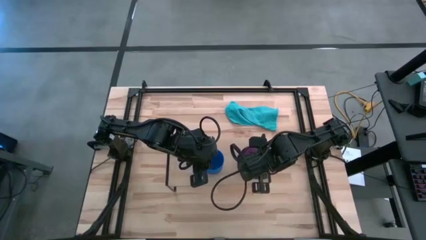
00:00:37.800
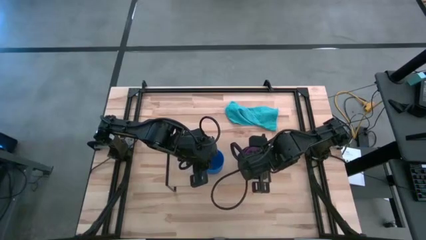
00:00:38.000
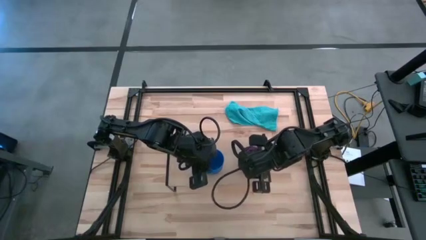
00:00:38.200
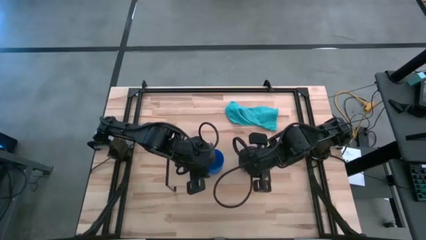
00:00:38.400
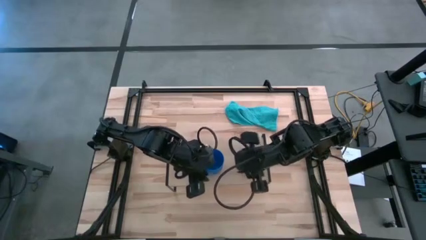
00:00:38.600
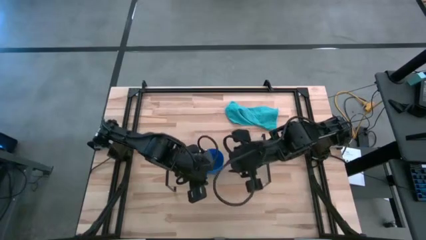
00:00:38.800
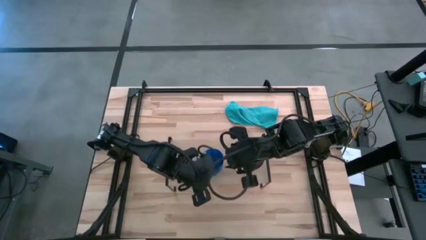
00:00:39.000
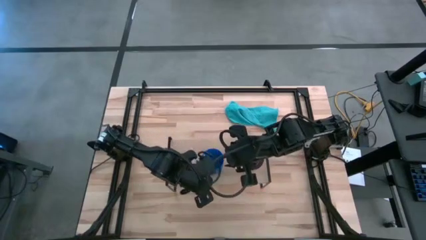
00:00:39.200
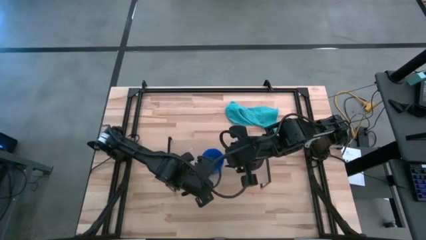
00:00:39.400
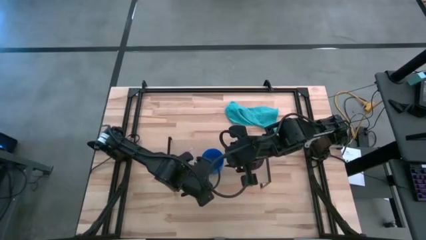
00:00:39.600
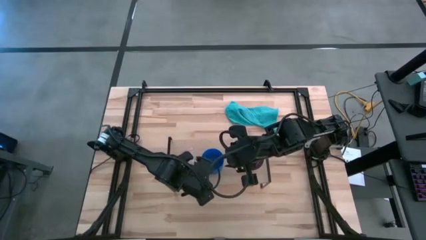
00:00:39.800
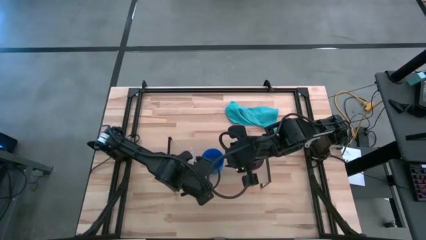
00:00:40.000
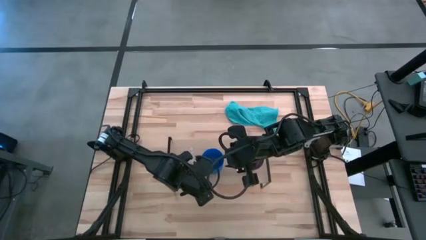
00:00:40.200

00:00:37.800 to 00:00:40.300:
Task: Stack small to large cups/mugs on shelf
Adjust the blue mug

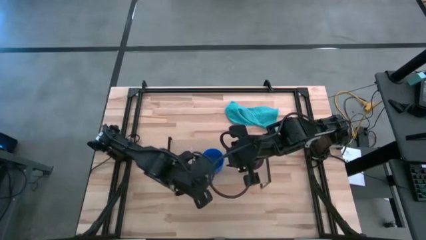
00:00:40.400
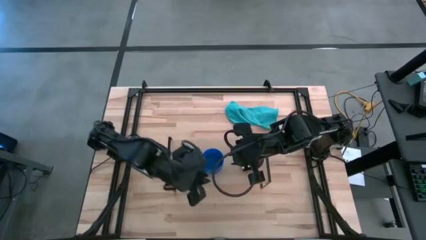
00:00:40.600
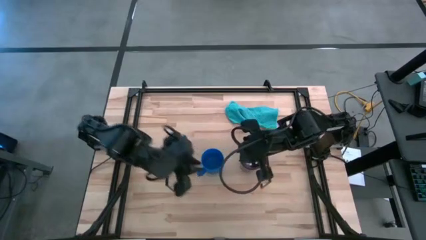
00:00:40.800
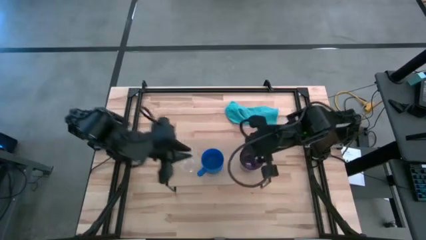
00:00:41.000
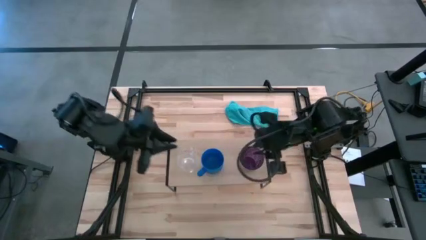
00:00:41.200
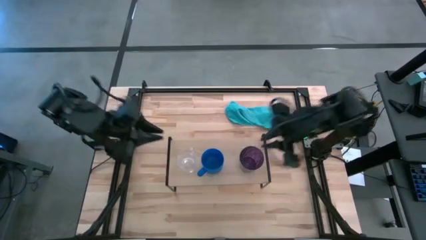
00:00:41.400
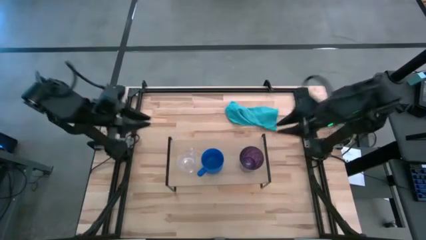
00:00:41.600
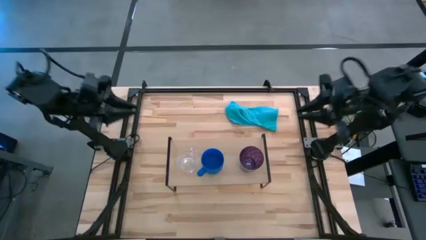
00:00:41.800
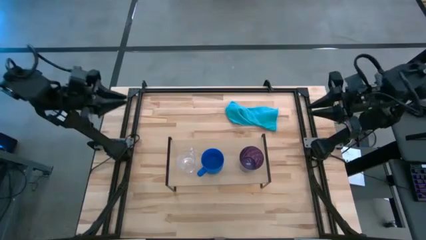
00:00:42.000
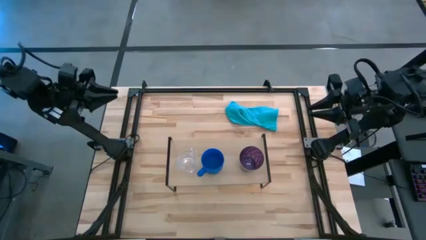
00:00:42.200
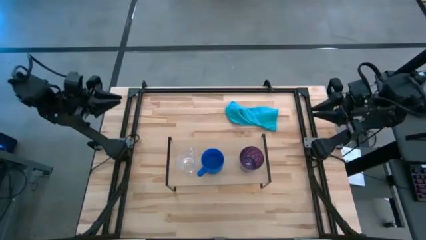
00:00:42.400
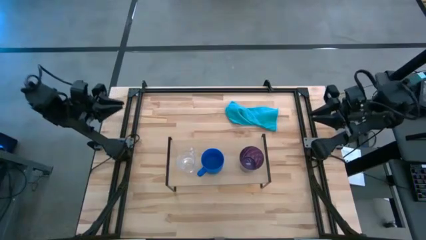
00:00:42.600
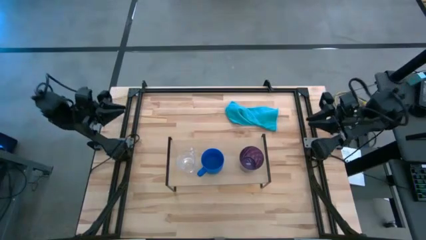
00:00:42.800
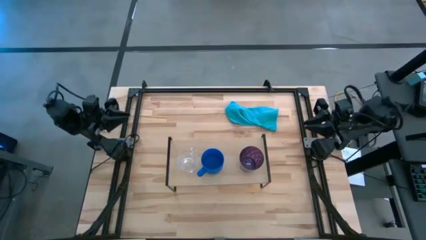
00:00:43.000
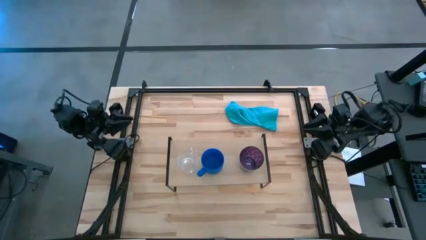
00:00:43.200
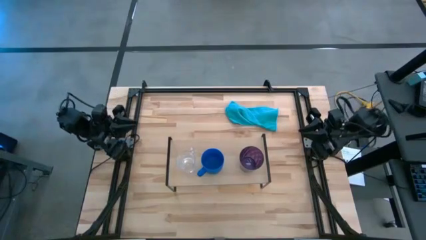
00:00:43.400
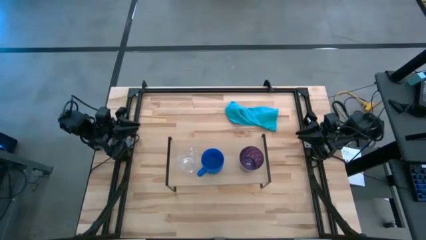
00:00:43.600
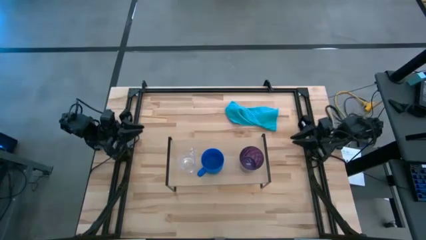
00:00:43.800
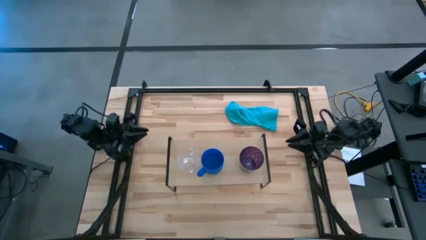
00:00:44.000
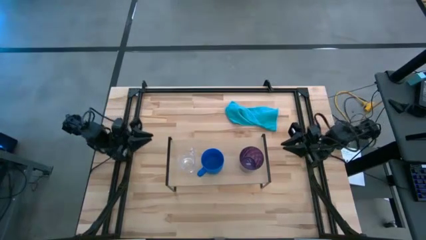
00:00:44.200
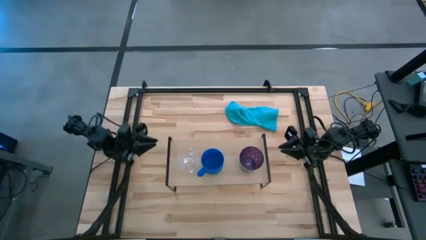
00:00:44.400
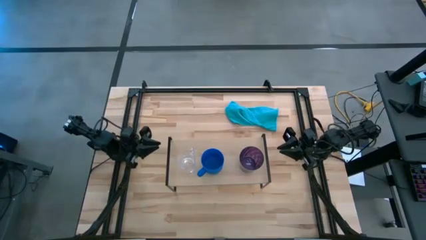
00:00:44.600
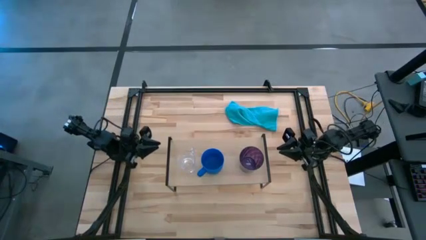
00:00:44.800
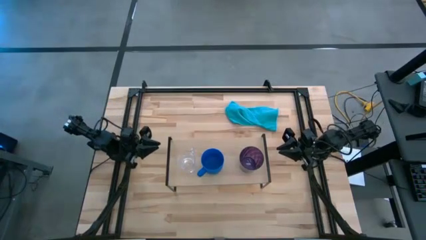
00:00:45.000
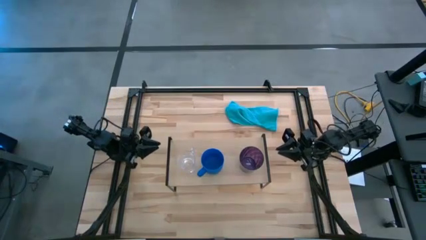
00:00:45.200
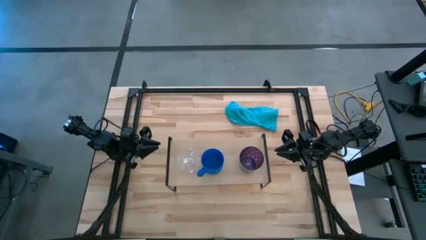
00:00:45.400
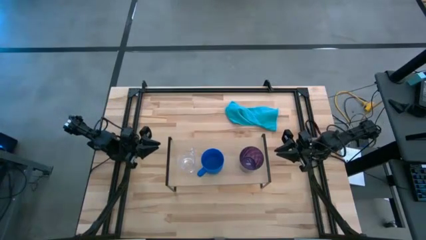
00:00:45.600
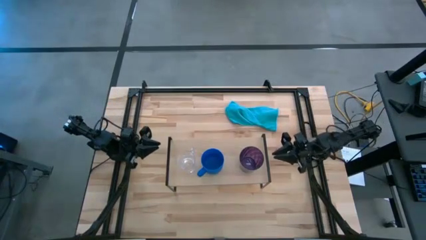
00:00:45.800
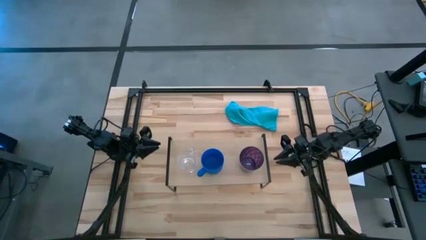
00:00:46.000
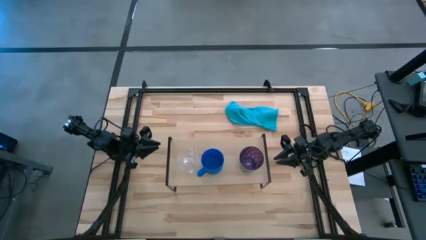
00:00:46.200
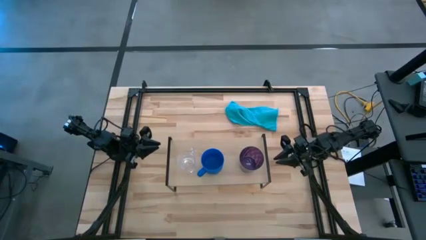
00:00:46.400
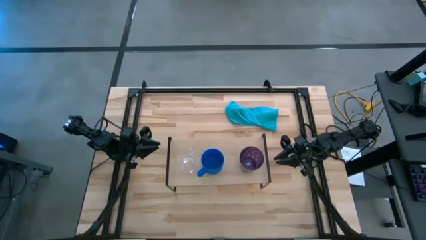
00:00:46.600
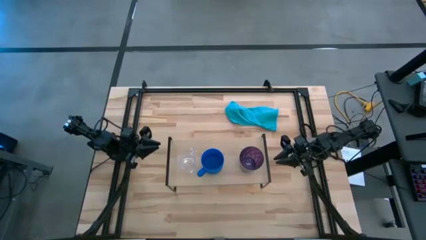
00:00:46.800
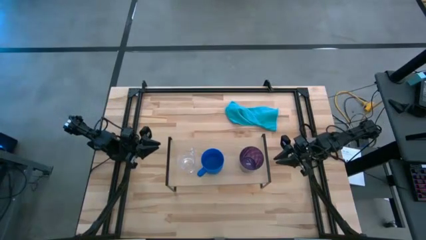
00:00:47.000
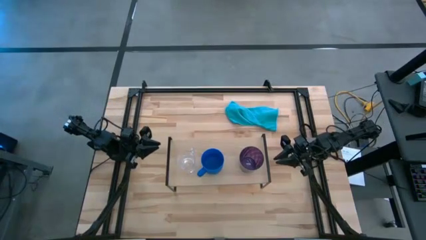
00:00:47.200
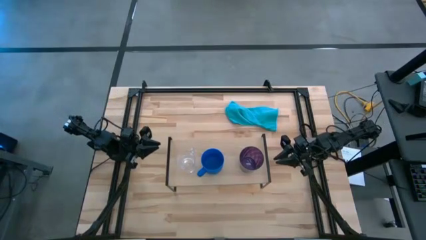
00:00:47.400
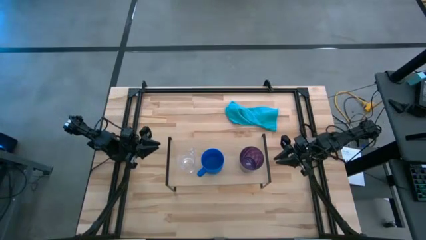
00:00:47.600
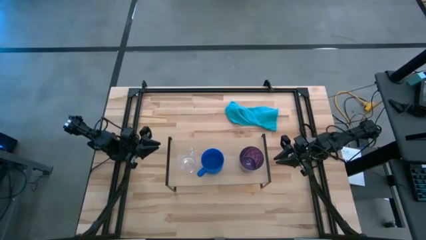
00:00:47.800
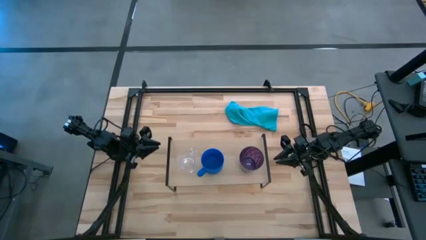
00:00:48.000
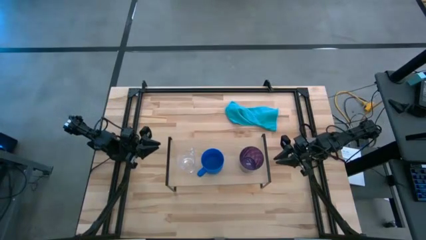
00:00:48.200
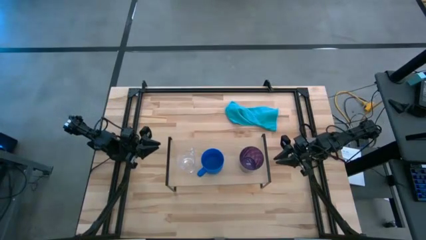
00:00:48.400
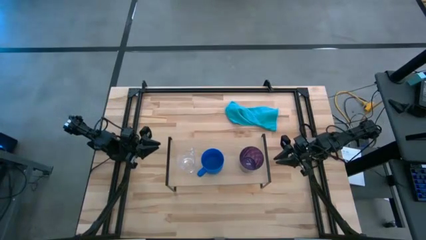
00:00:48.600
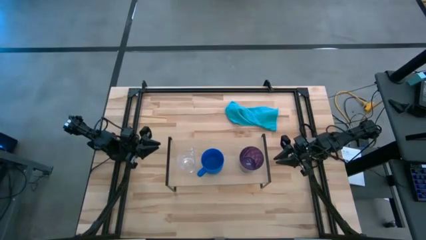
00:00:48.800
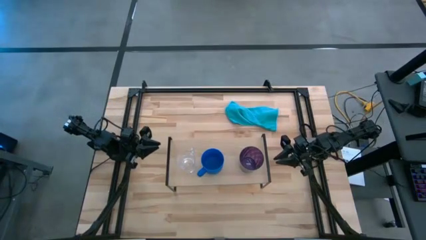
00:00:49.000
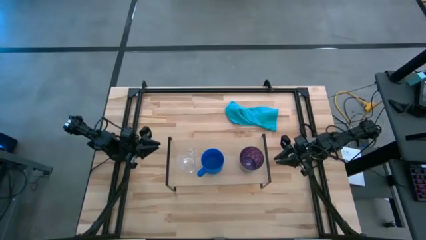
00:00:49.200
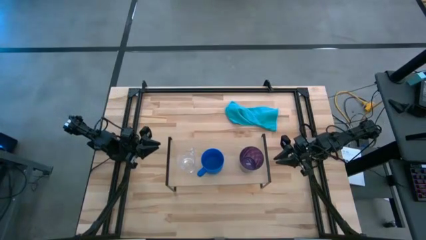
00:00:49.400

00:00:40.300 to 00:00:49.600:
Return to Home Position
